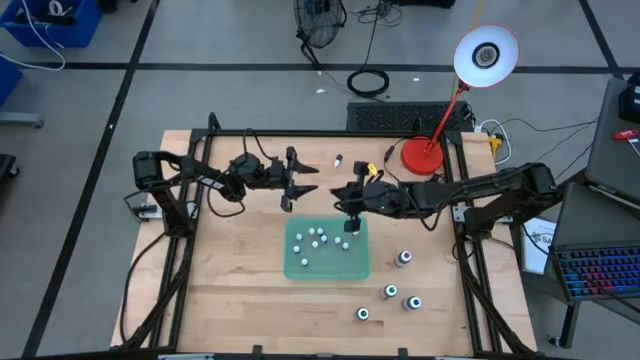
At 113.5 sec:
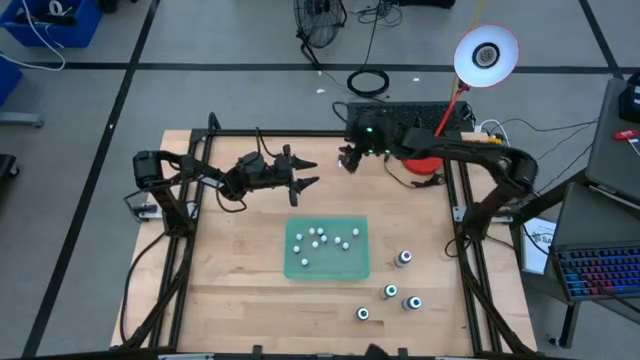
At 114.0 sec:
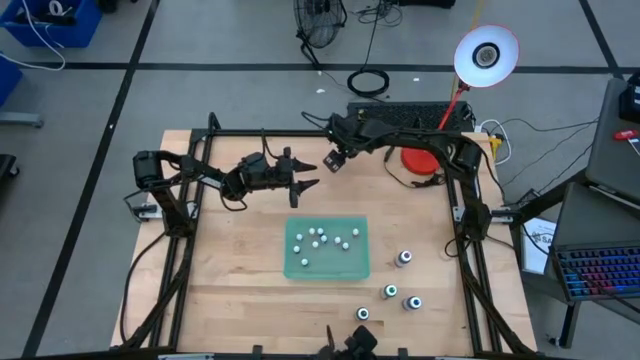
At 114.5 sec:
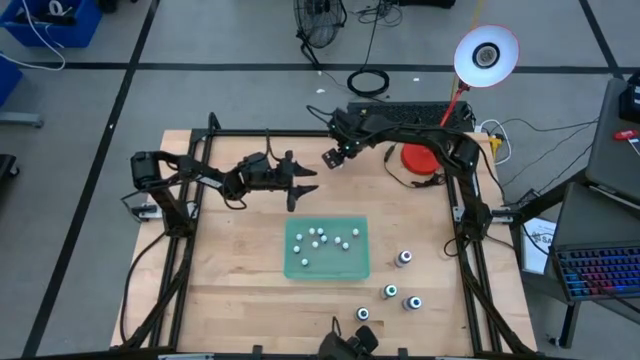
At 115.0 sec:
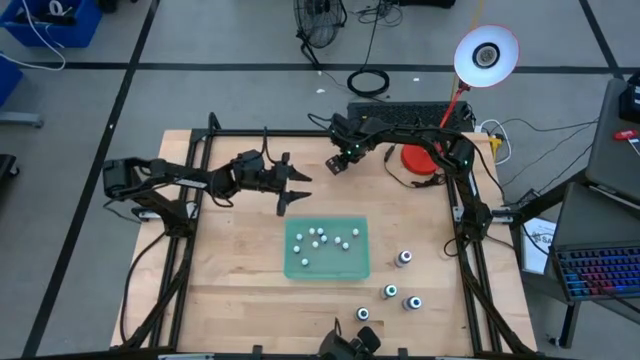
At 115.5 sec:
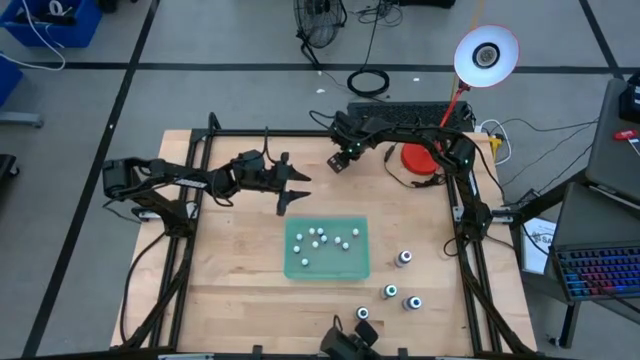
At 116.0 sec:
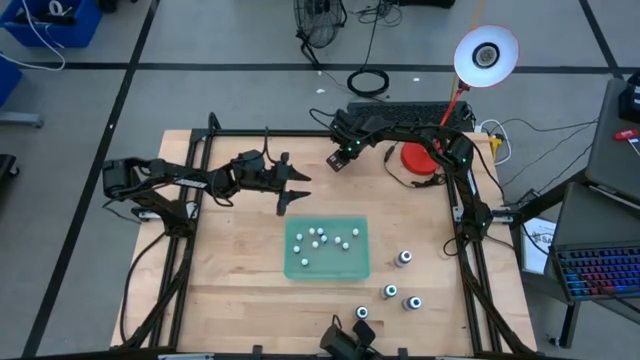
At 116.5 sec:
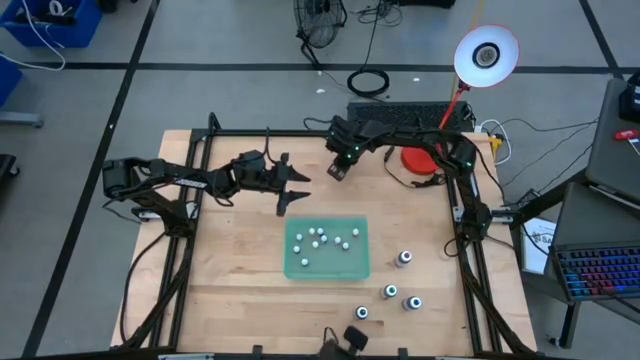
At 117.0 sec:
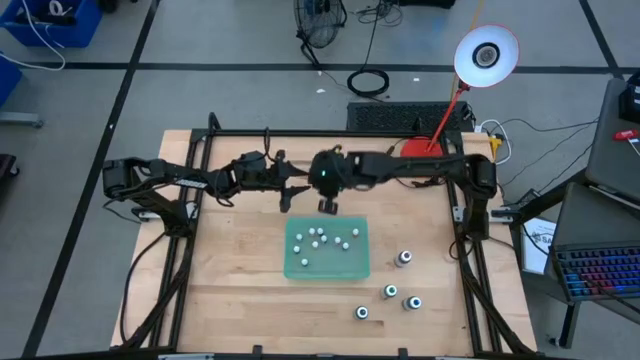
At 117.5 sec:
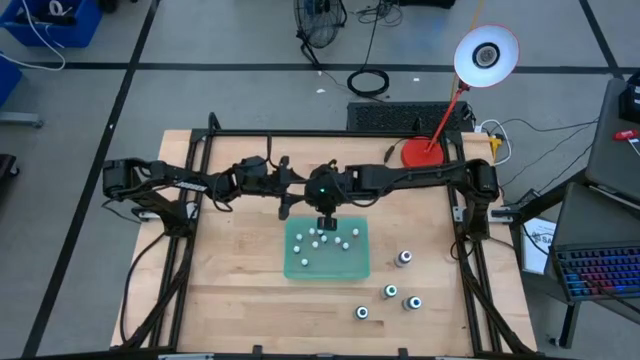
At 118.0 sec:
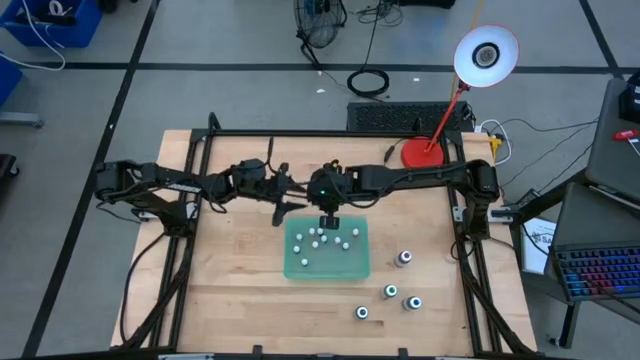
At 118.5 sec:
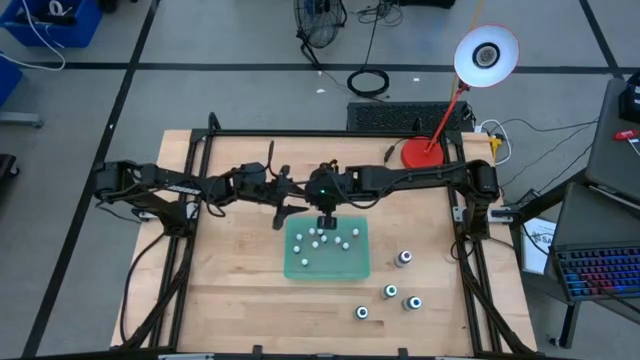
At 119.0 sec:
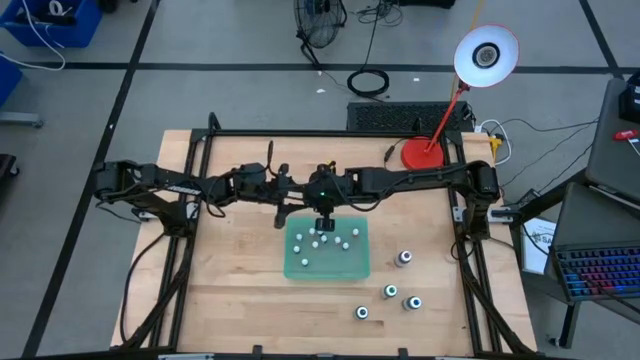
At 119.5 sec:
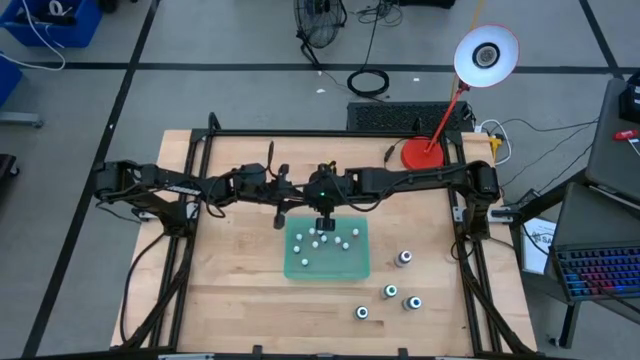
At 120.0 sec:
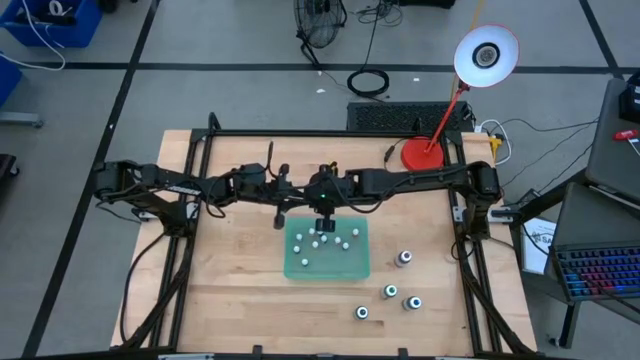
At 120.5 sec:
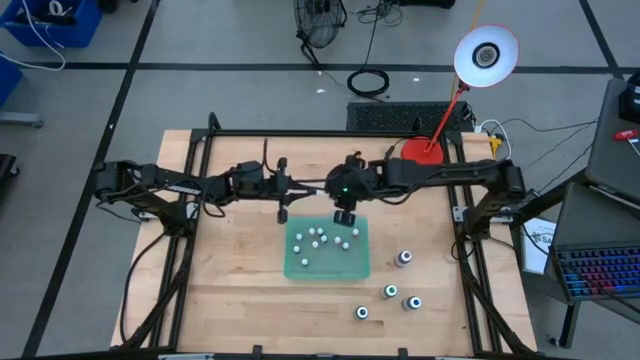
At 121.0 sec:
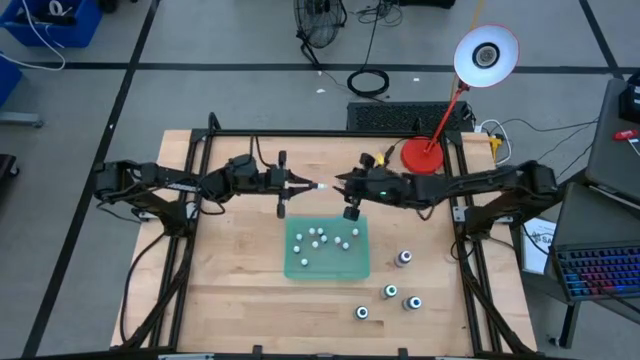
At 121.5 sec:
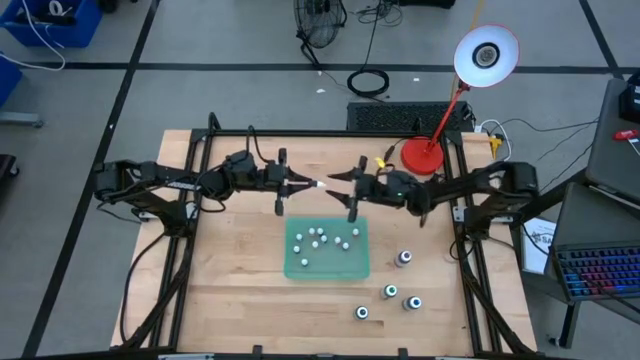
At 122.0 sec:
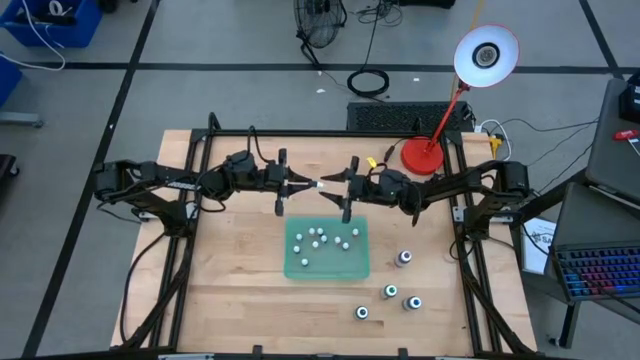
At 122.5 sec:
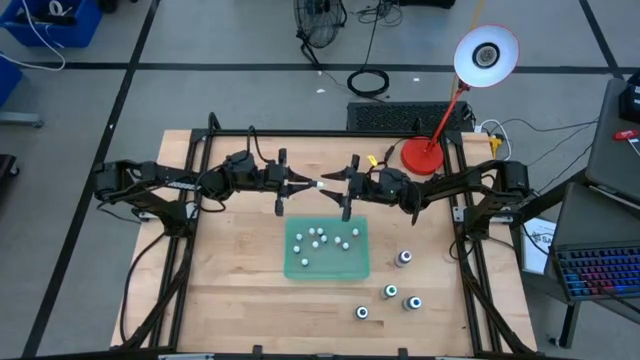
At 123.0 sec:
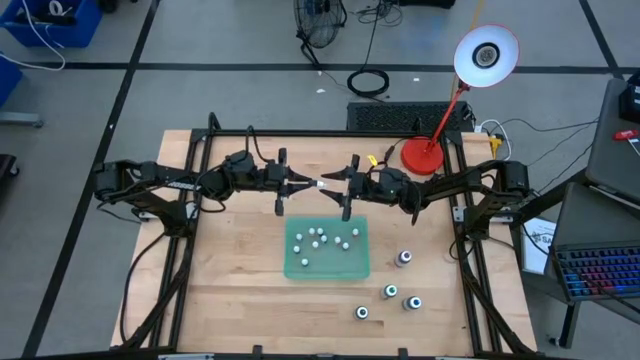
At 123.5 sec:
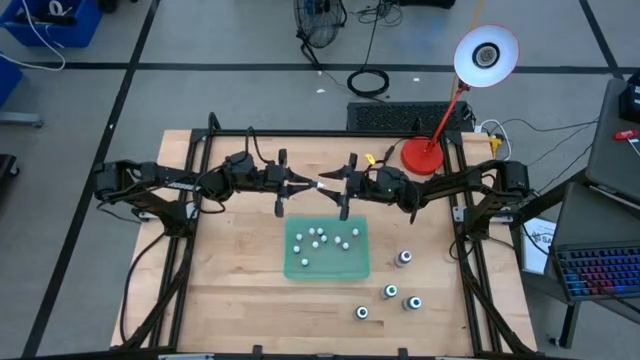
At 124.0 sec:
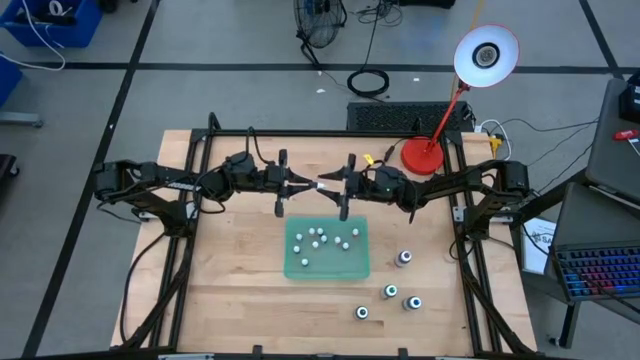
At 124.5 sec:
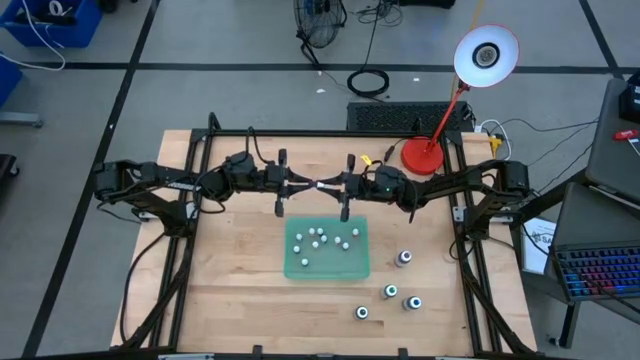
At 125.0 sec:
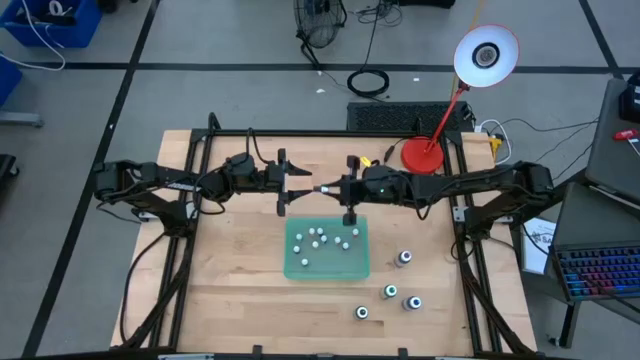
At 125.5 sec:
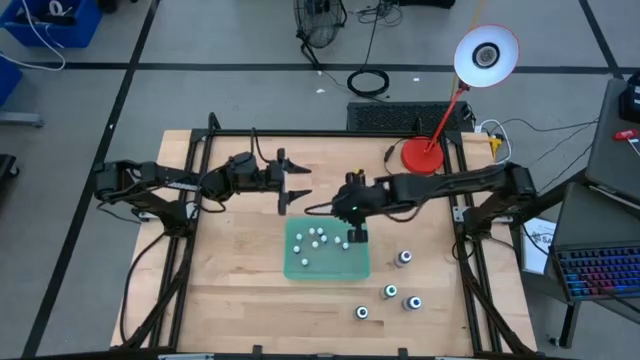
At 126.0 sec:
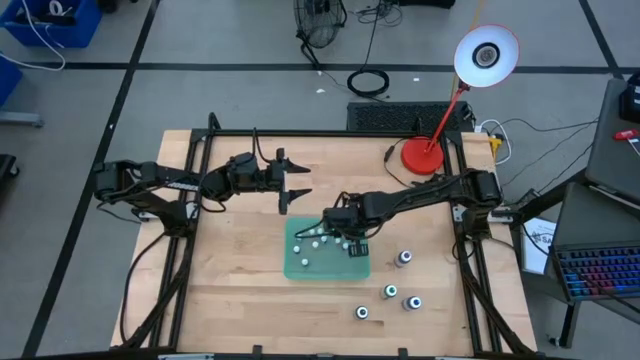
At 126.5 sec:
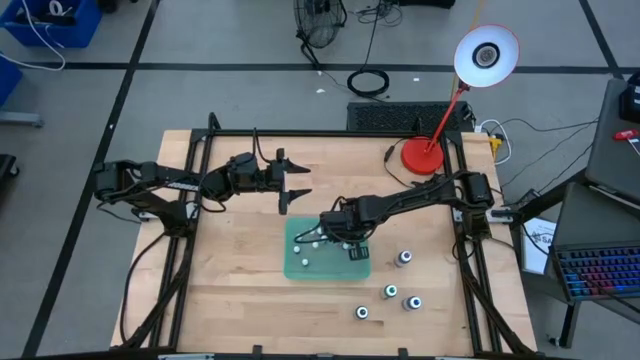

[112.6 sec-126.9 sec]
Task: Pick & Place food coloring
Put the small purple food coloring bottle into the blue bin

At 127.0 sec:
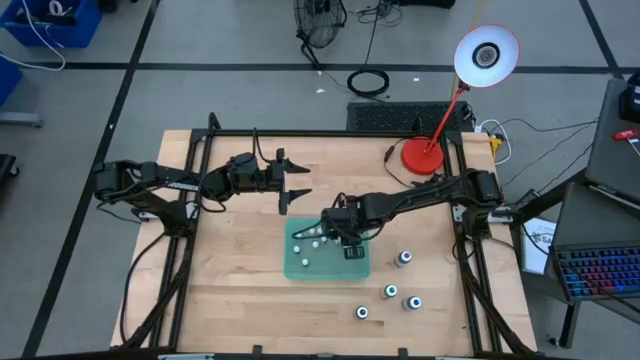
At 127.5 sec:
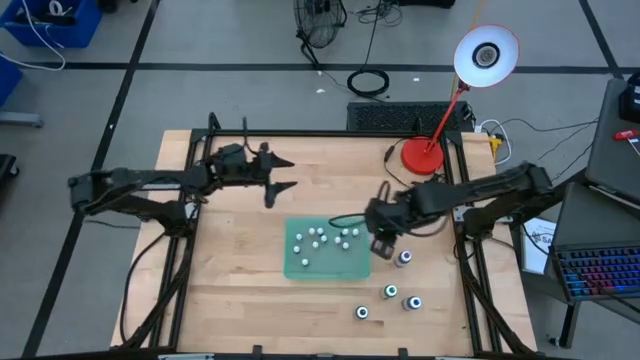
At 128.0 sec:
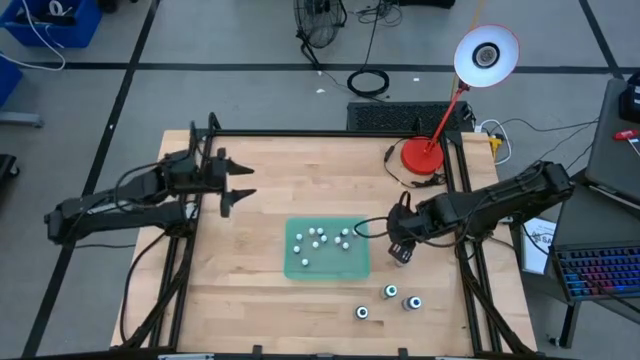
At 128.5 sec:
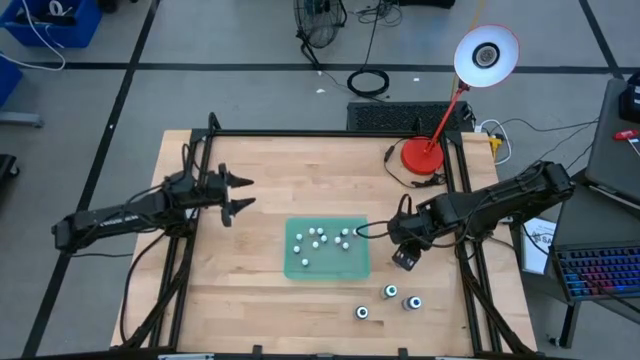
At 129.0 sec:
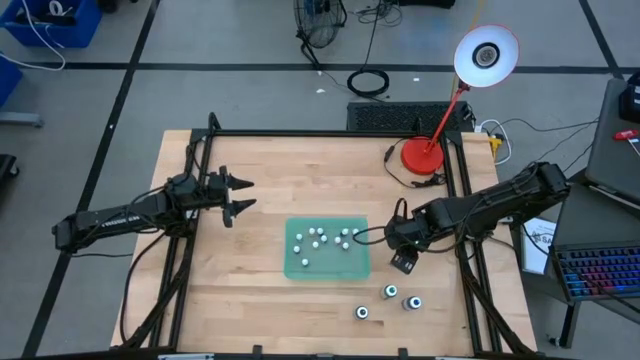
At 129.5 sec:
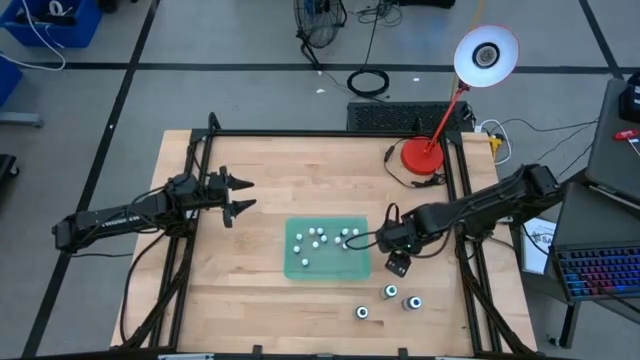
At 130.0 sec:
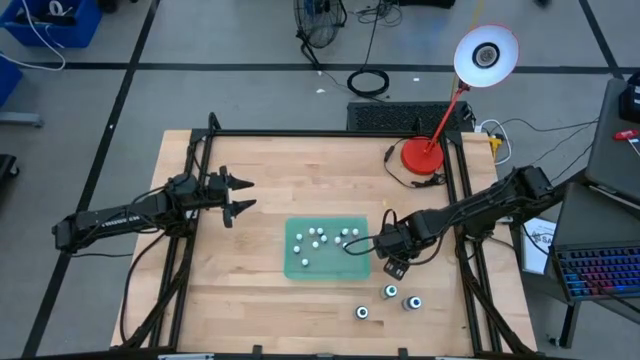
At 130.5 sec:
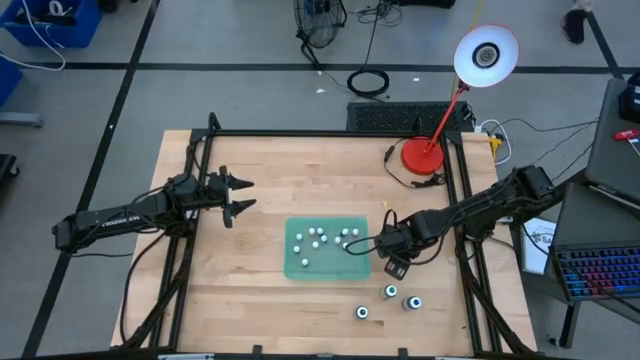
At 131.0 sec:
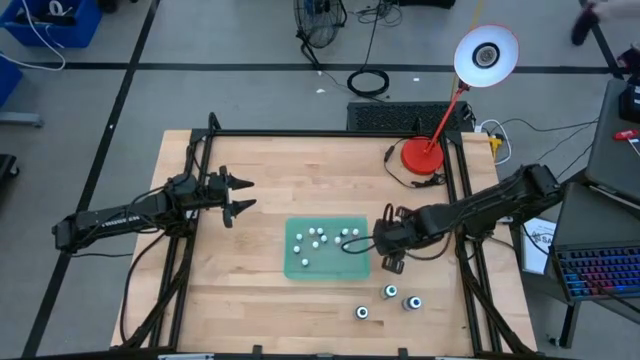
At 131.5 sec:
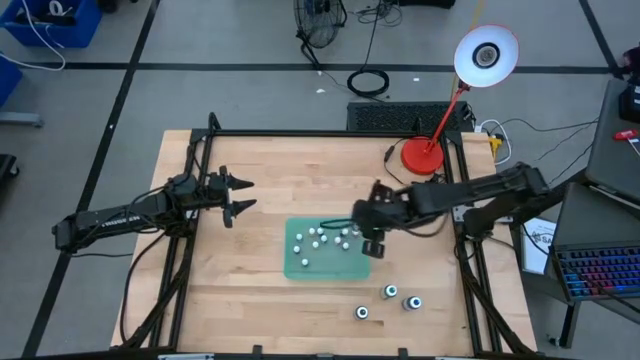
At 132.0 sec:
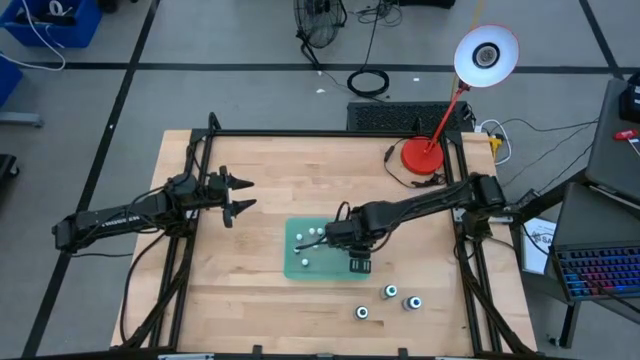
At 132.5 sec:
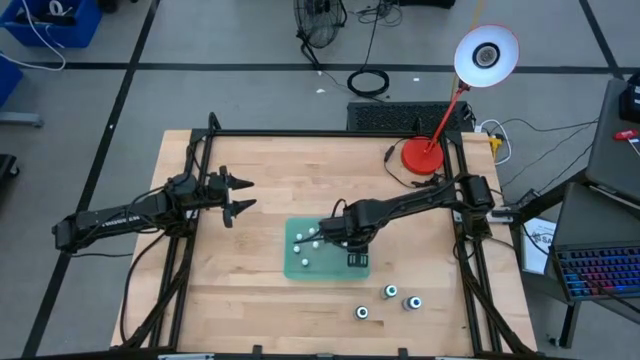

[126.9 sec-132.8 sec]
Put the large purple food coloring bottle into the blue bin

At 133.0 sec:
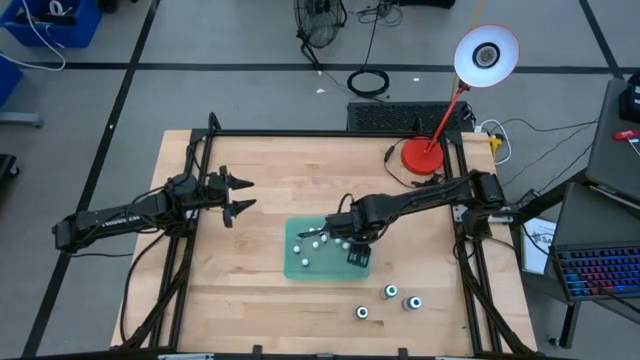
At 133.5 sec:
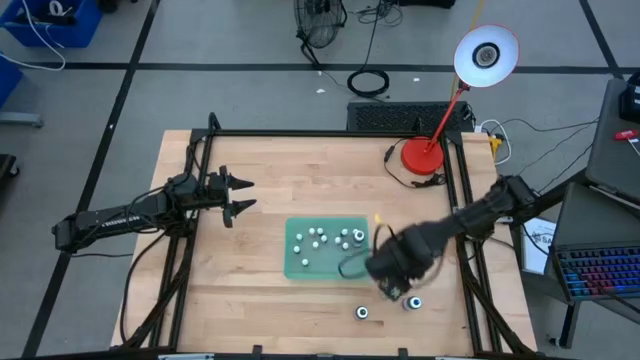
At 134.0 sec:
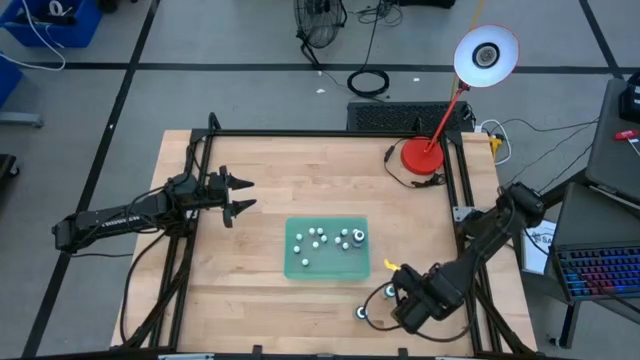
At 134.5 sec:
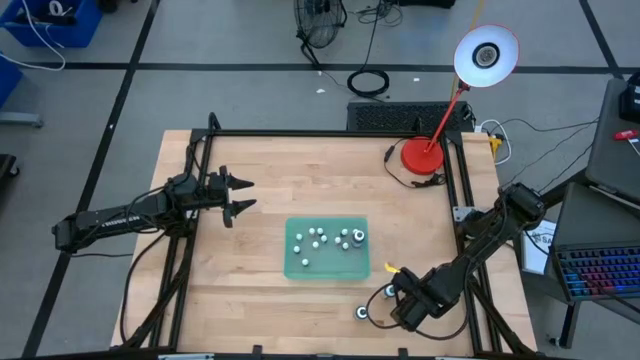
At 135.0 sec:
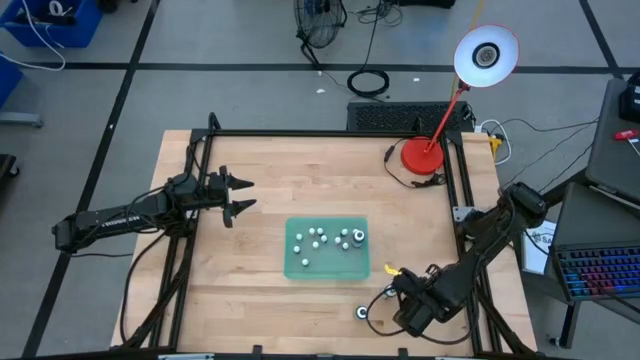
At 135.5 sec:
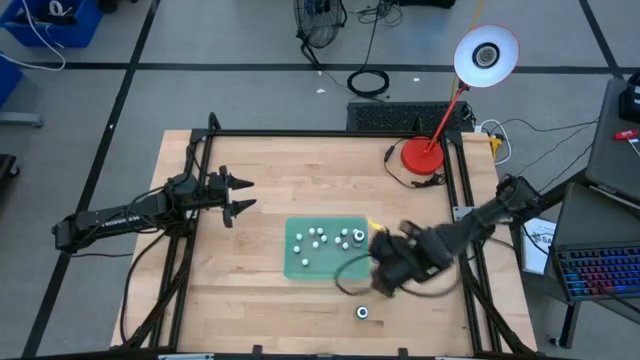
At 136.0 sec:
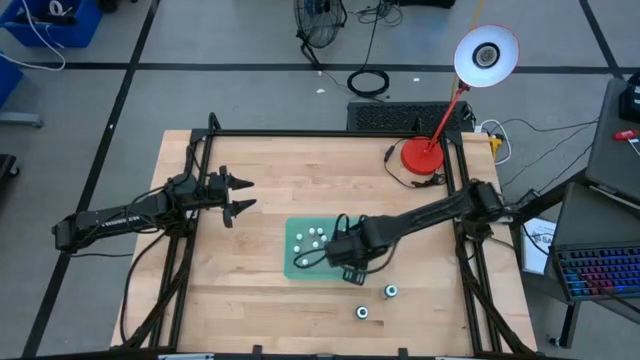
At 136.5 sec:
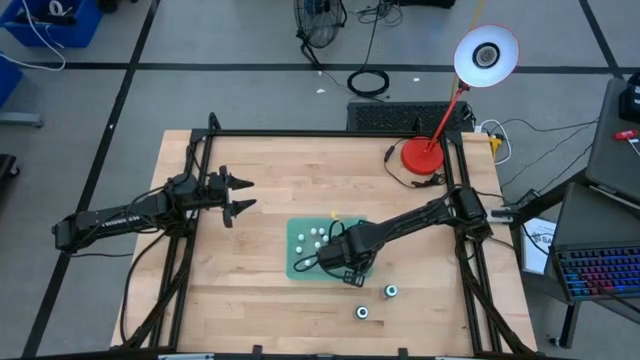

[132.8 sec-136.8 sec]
Put the large blue food coloring bottle into the blue bin
